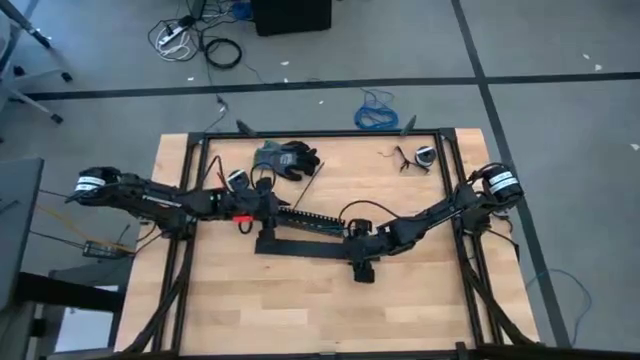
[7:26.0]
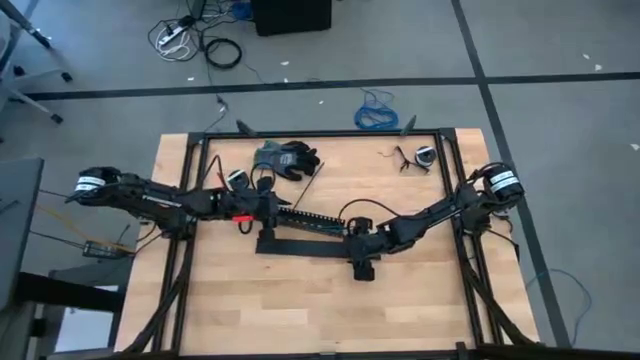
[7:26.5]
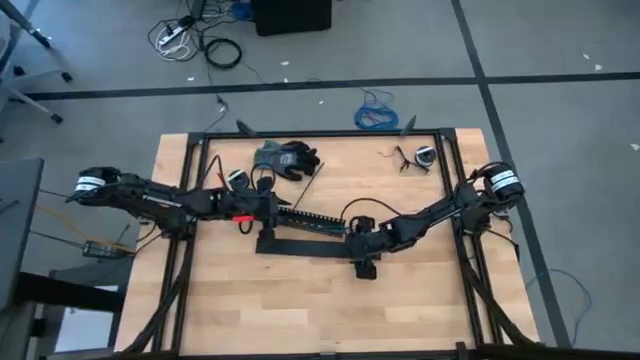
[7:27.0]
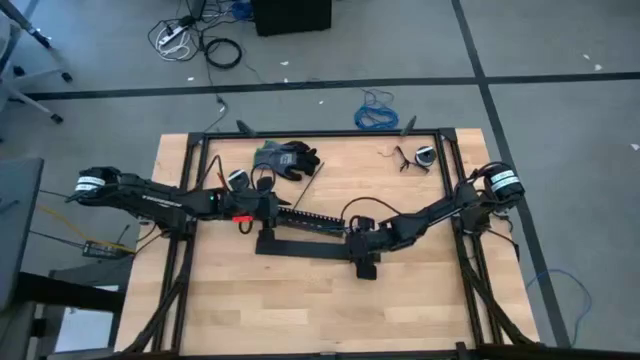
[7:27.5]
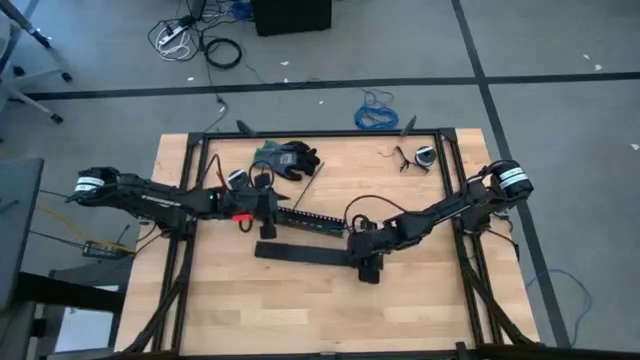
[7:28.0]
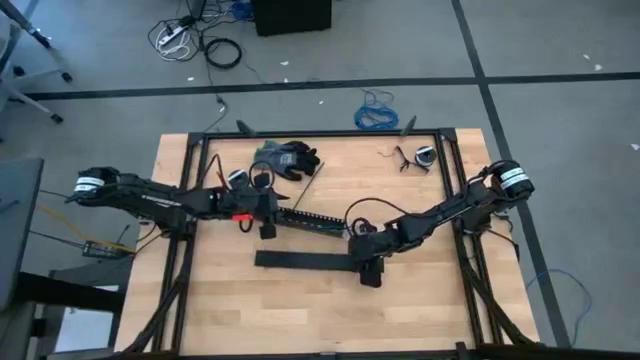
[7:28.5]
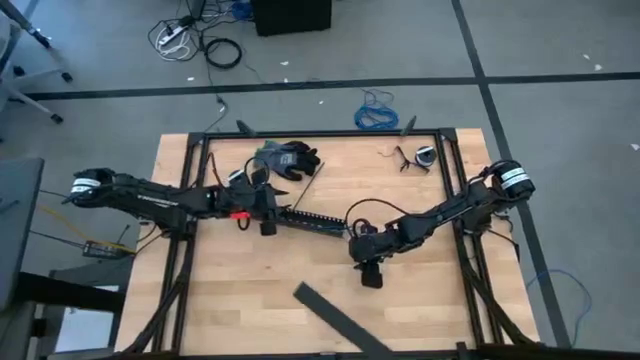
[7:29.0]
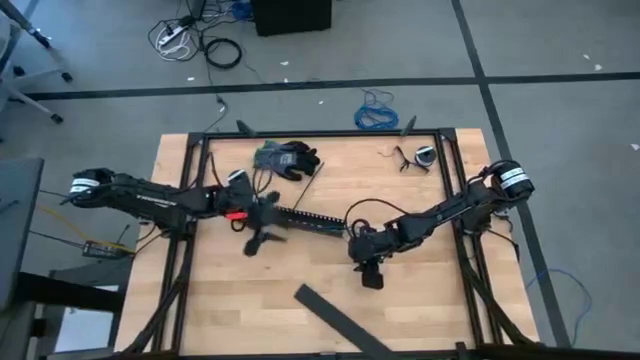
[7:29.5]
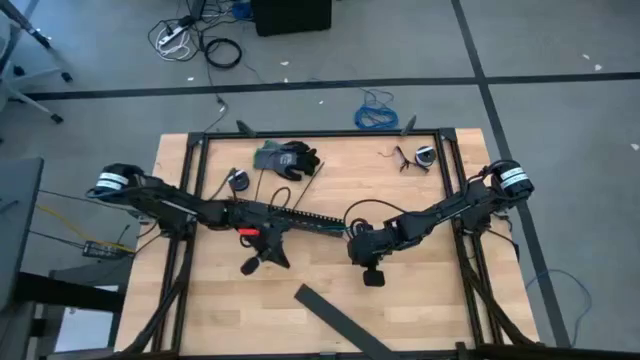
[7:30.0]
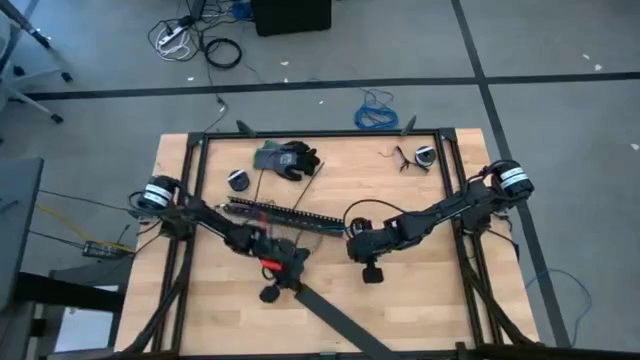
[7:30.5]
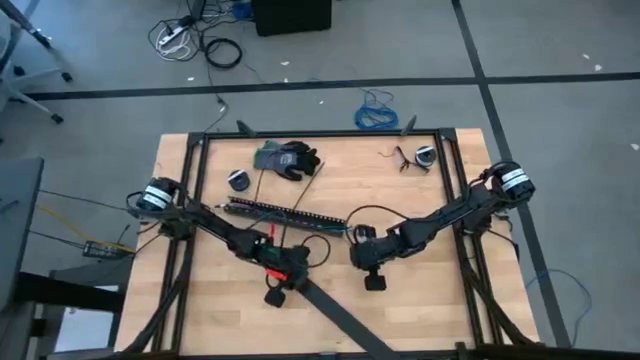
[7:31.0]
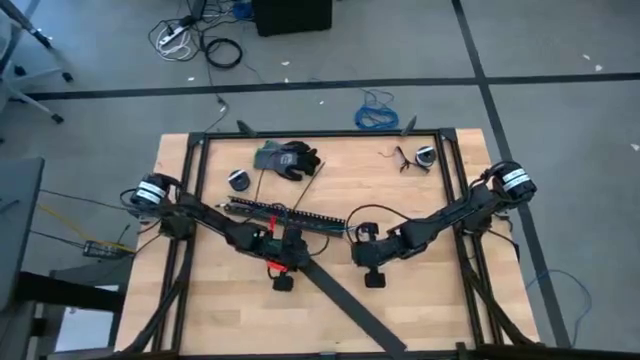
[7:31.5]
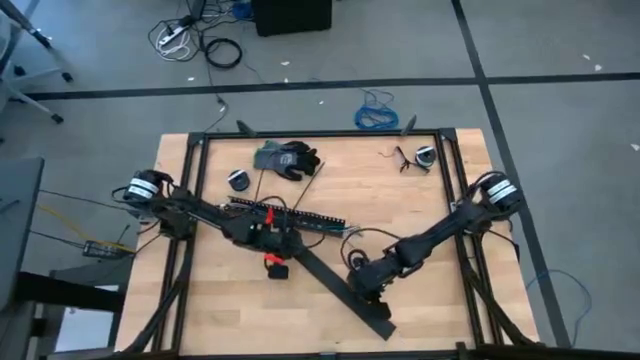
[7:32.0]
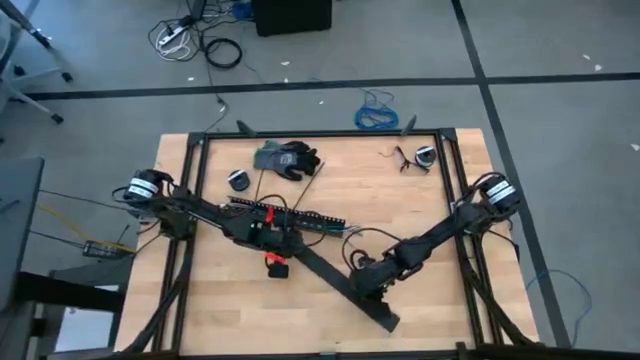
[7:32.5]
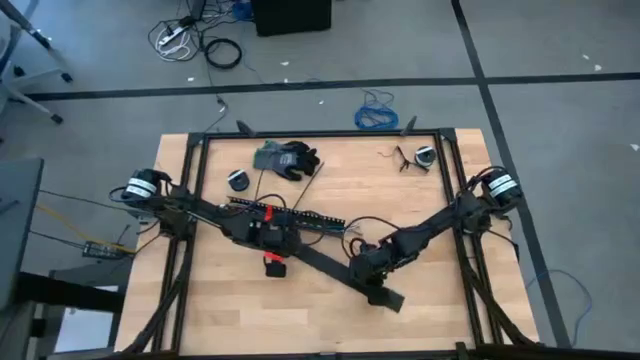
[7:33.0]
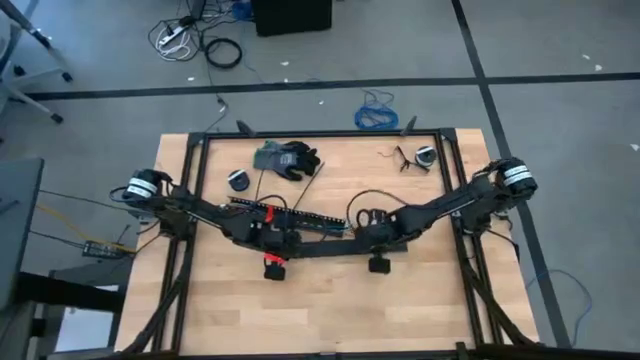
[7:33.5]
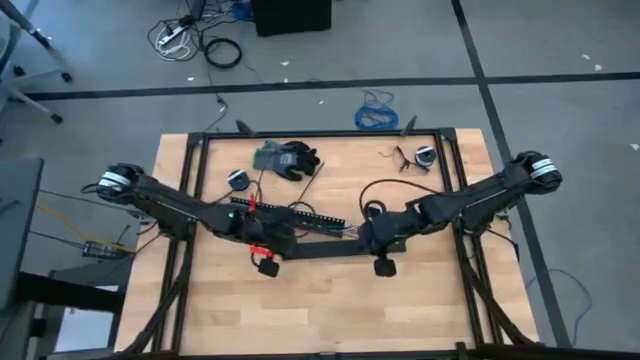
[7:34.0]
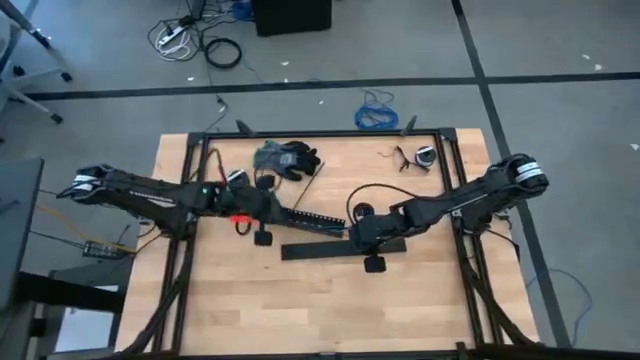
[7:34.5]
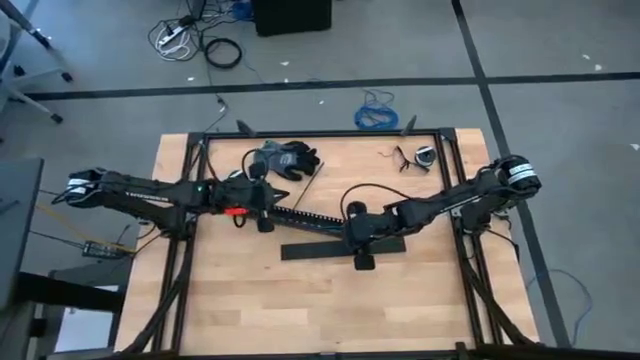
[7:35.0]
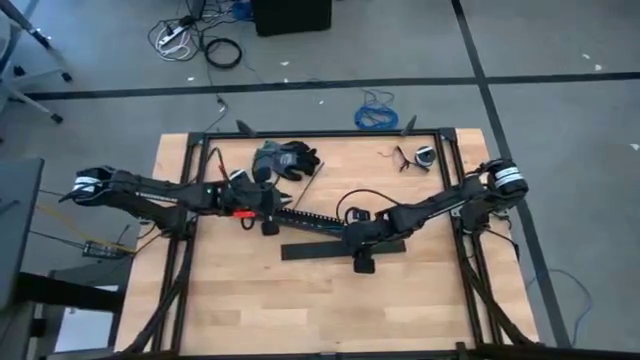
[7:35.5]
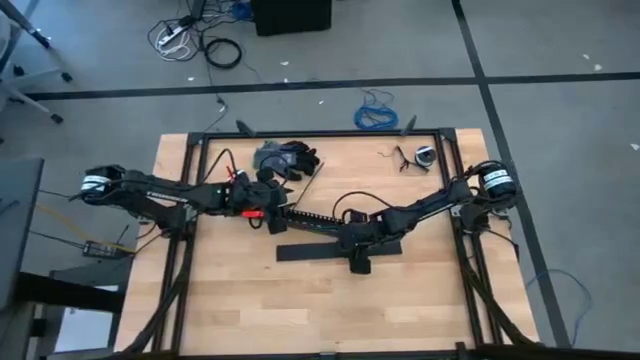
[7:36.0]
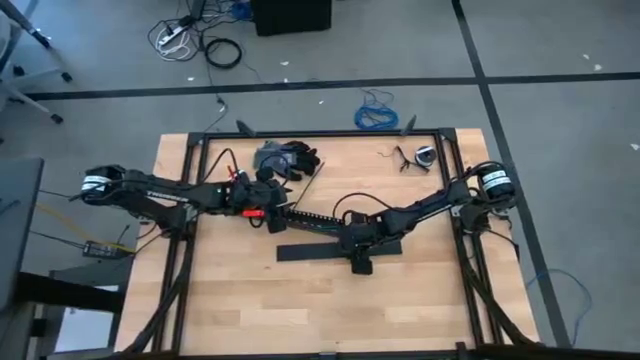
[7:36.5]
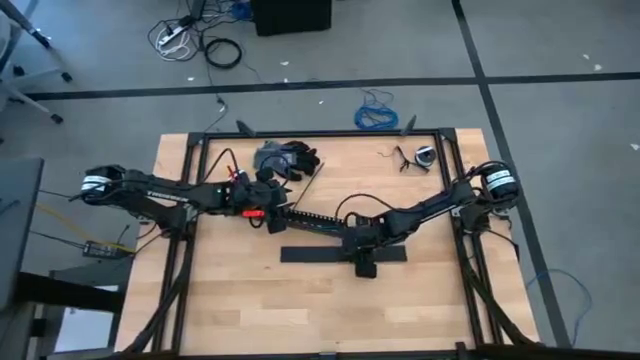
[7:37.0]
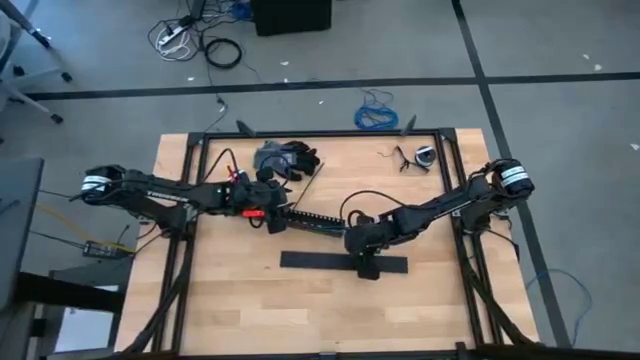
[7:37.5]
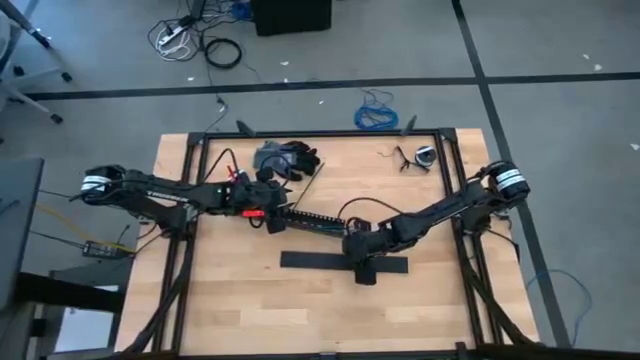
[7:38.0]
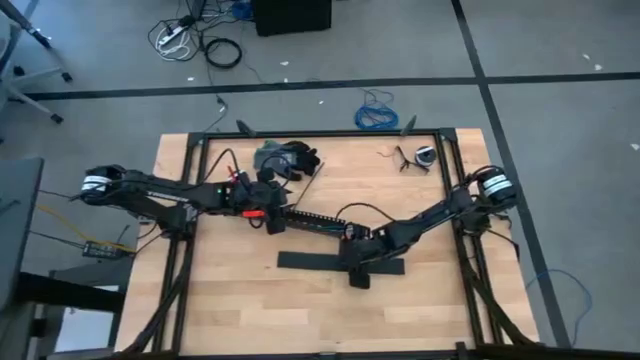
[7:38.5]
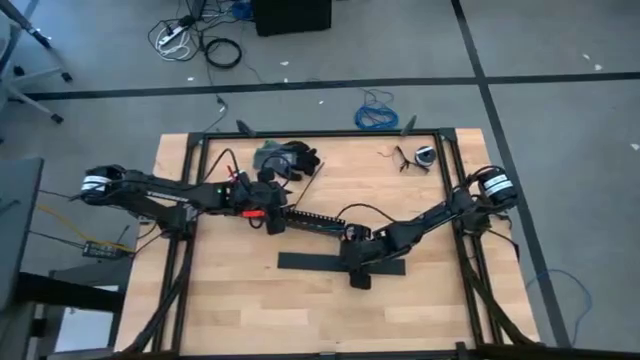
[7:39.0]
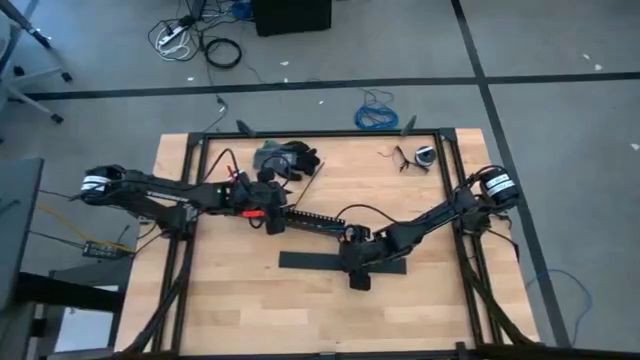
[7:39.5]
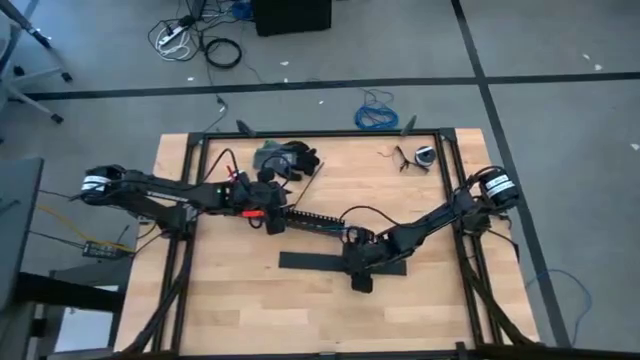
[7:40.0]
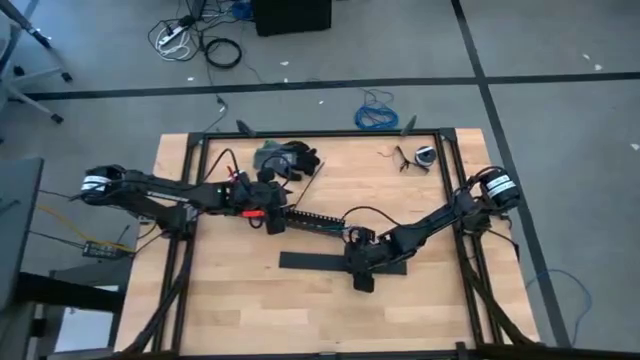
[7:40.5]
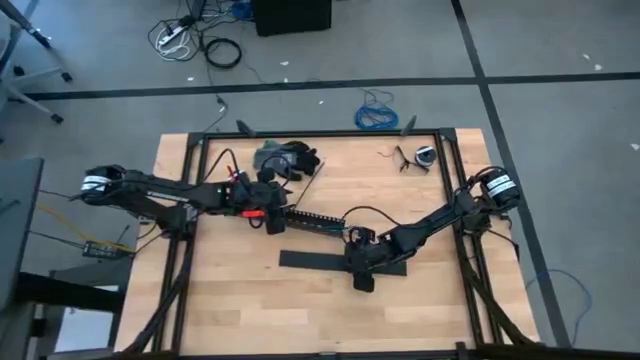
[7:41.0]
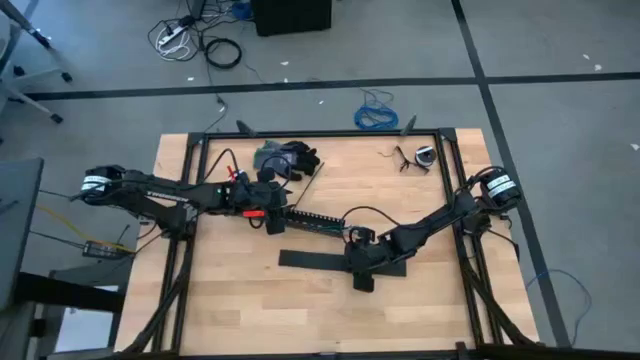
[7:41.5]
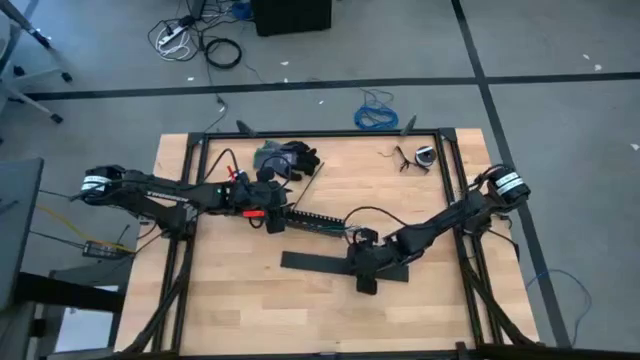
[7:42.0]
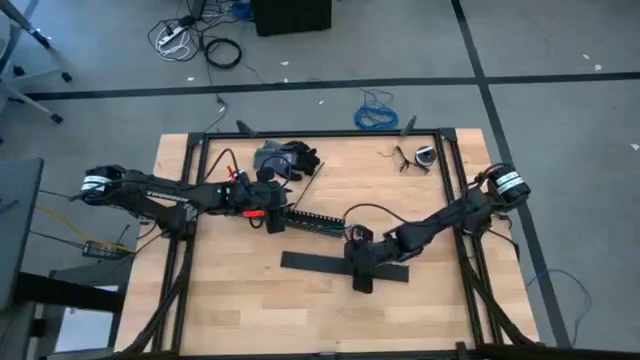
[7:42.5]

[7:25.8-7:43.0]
Task: Ziptie cables
Close the black cable duct cover

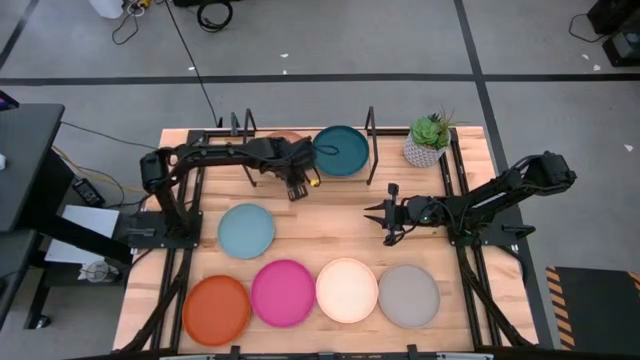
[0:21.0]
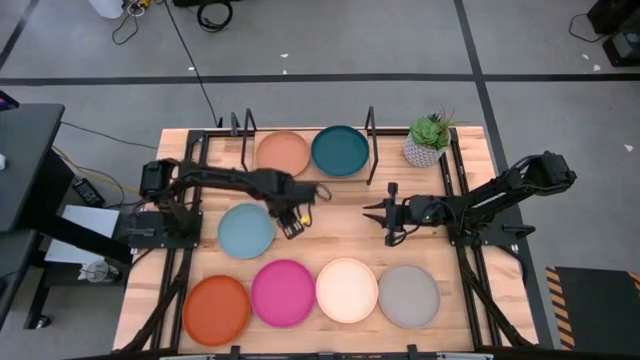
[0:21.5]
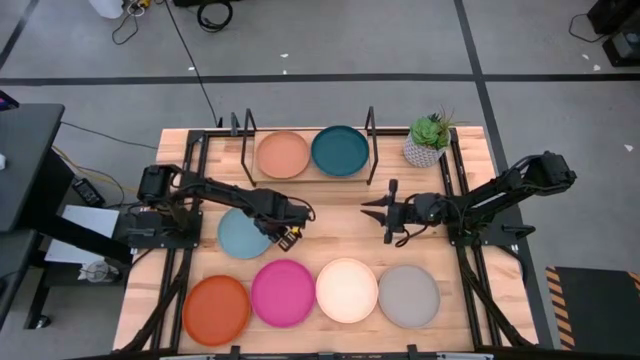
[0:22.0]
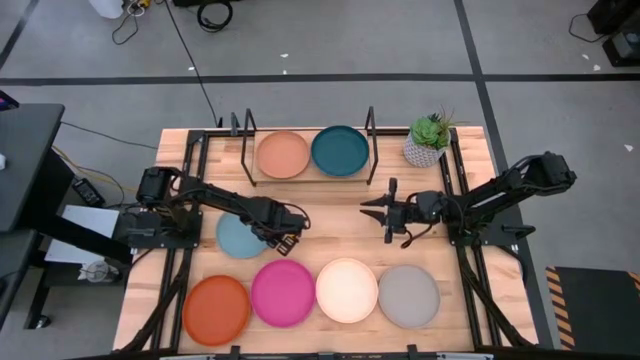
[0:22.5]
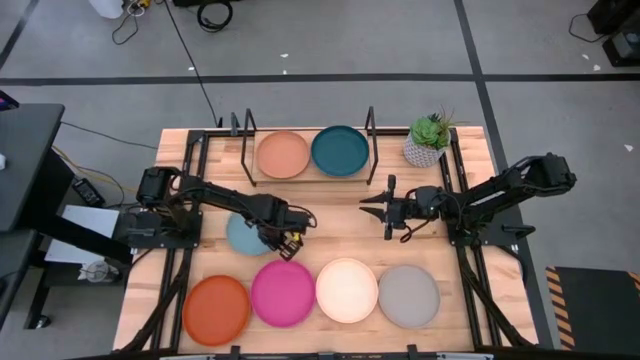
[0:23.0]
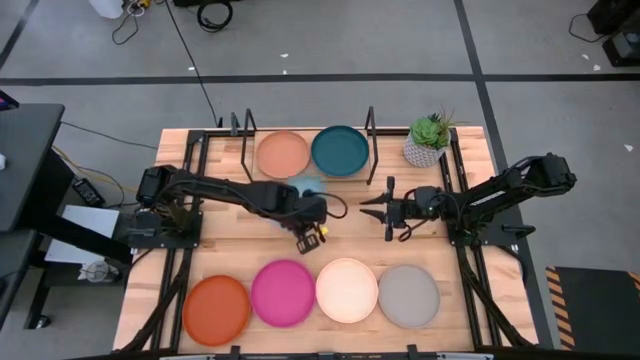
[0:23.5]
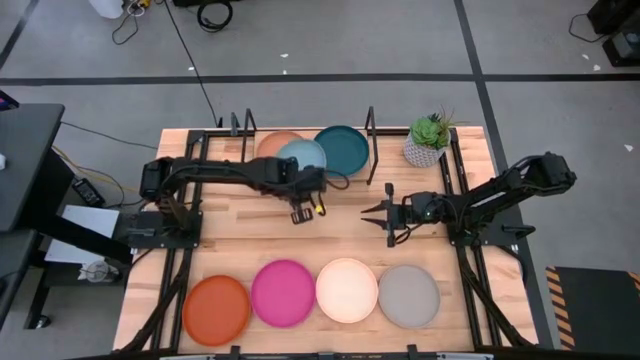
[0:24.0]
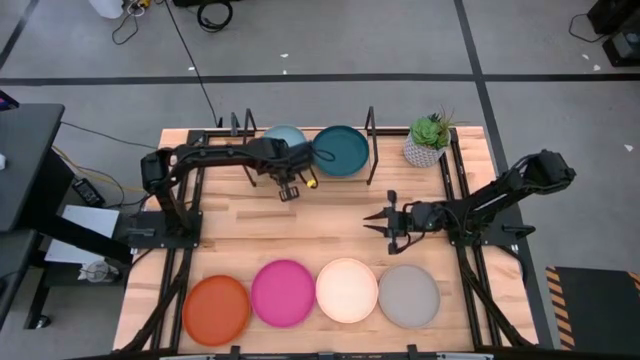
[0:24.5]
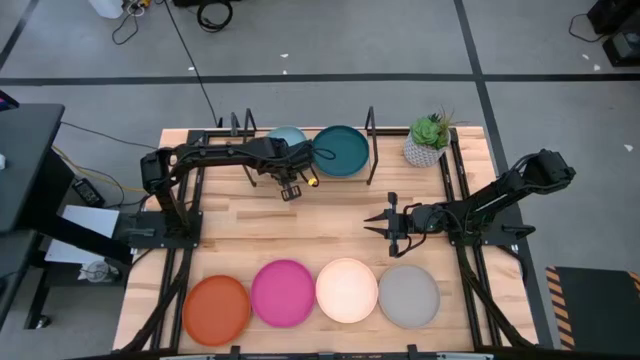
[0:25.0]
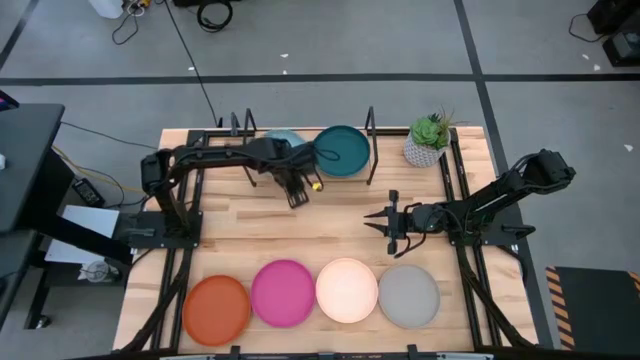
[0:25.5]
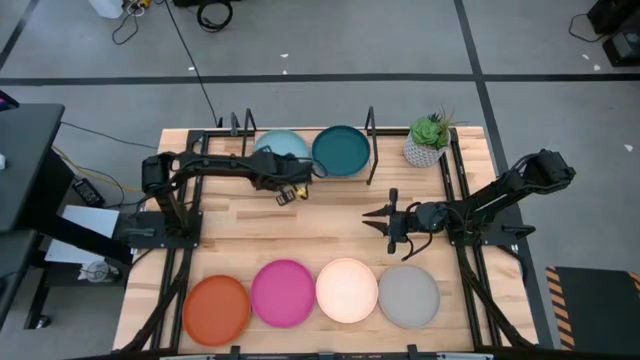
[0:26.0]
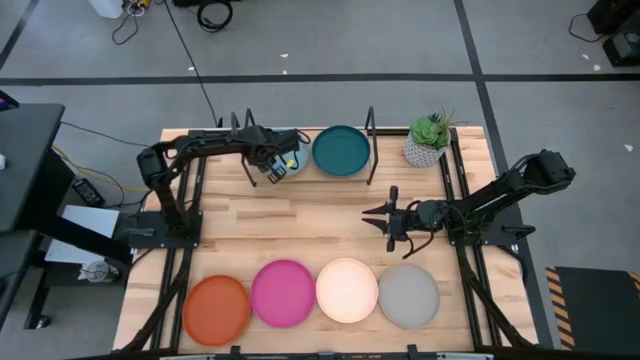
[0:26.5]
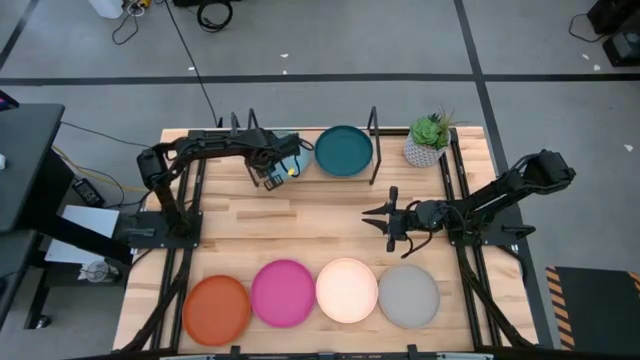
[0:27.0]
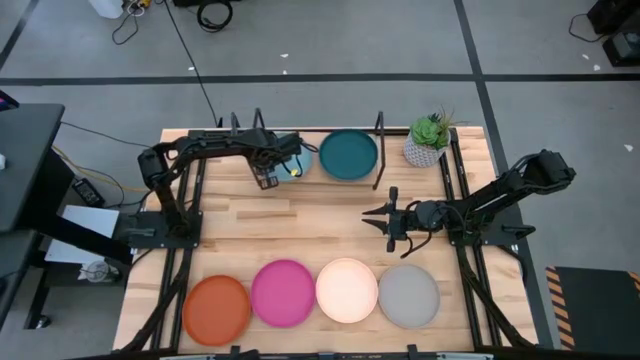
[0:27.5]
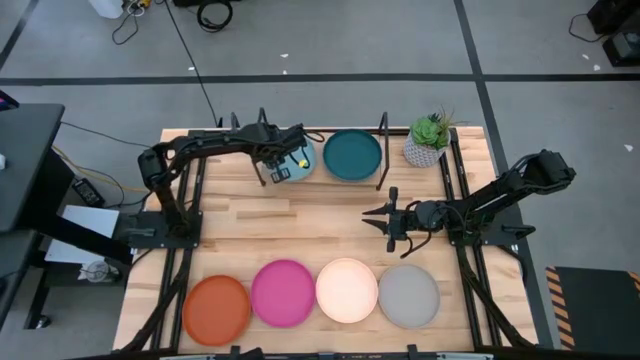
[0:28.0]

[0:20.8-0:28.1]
Task: Place and stack plates onto a shelf
Stack the light blue onto the light orange plate
